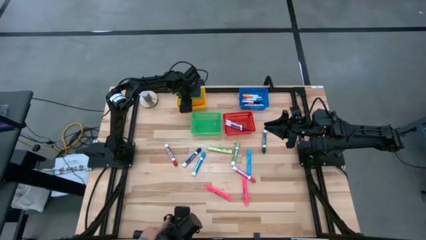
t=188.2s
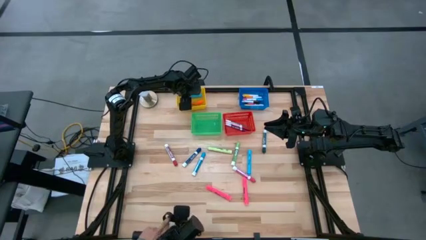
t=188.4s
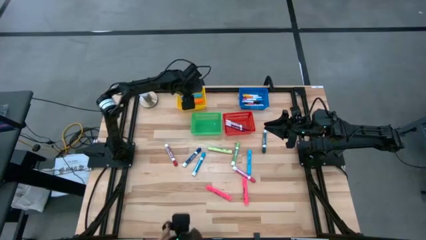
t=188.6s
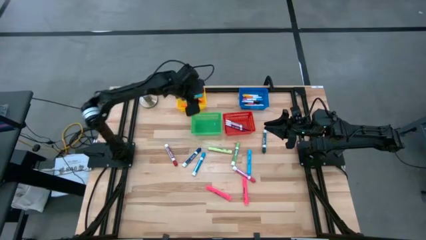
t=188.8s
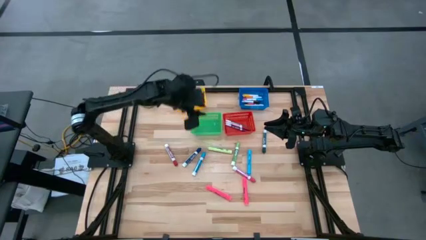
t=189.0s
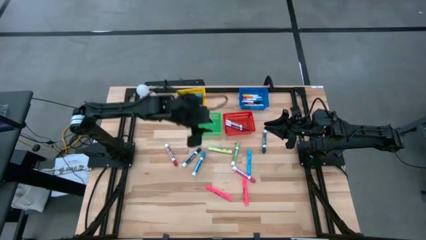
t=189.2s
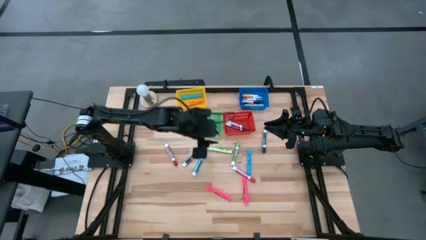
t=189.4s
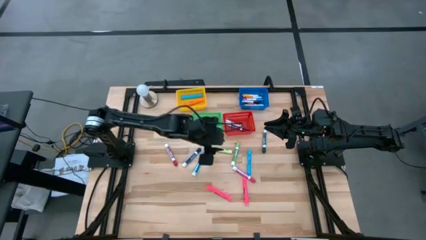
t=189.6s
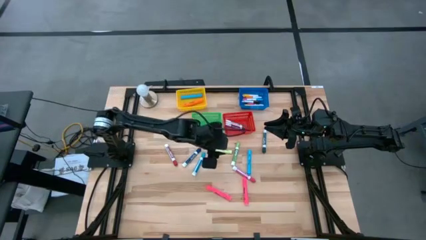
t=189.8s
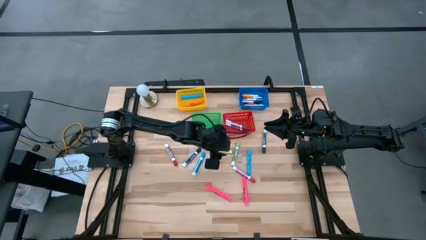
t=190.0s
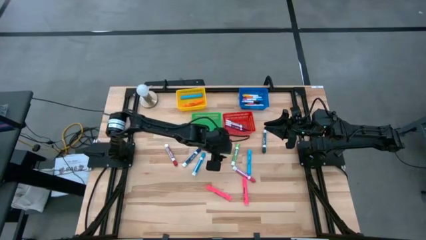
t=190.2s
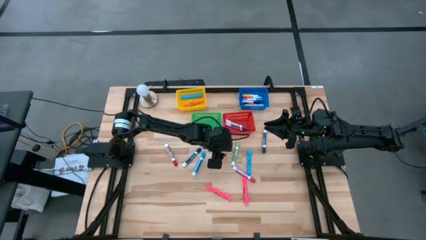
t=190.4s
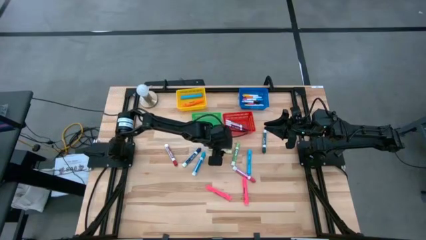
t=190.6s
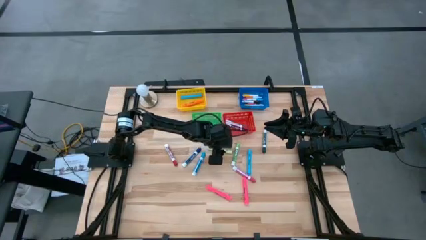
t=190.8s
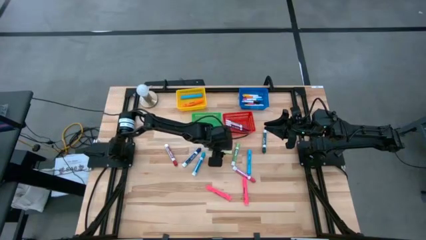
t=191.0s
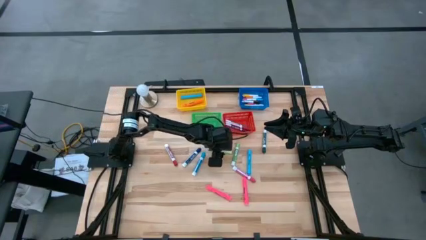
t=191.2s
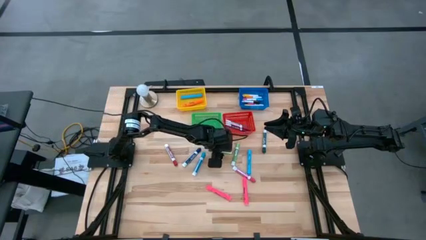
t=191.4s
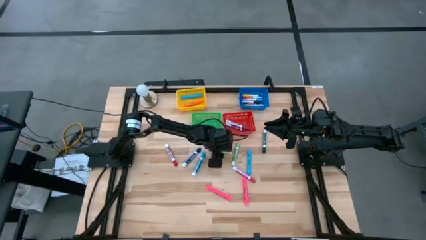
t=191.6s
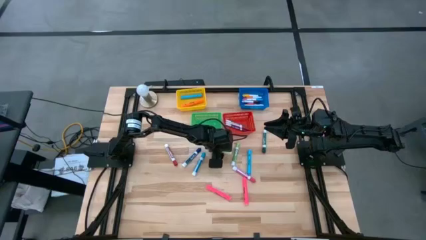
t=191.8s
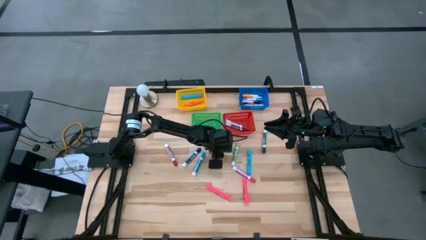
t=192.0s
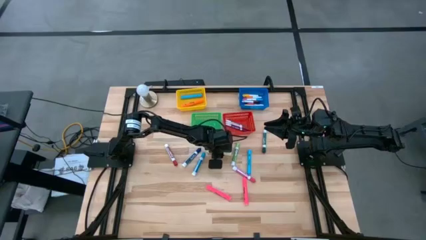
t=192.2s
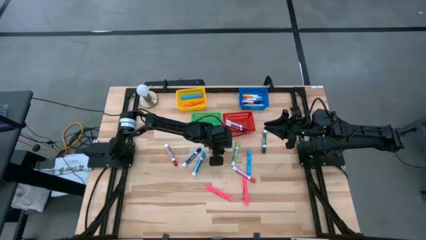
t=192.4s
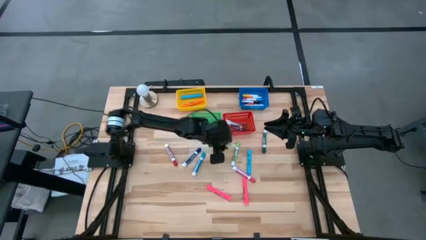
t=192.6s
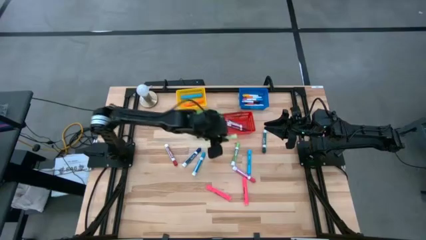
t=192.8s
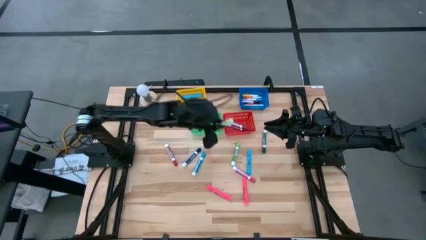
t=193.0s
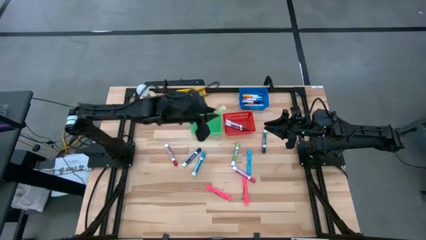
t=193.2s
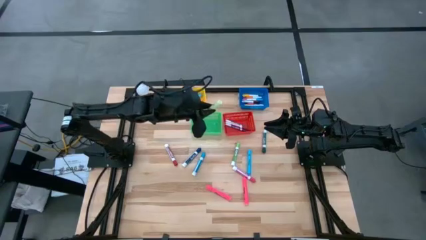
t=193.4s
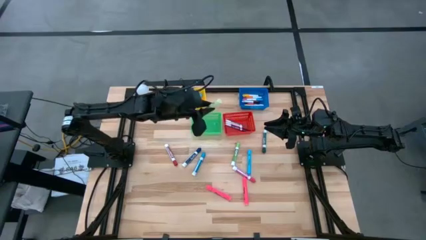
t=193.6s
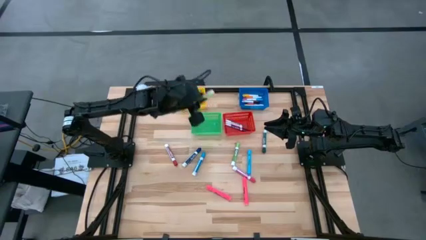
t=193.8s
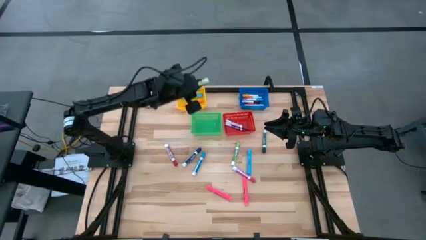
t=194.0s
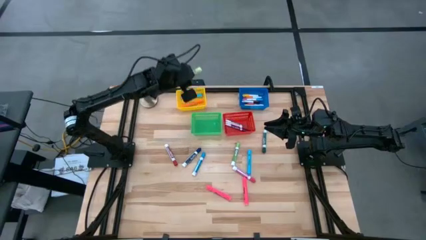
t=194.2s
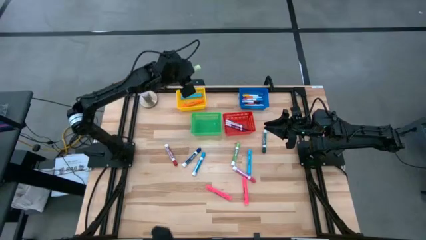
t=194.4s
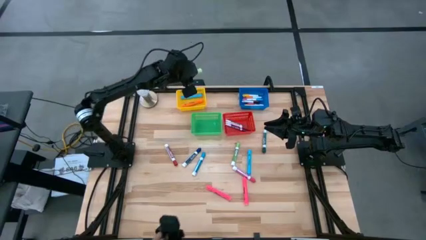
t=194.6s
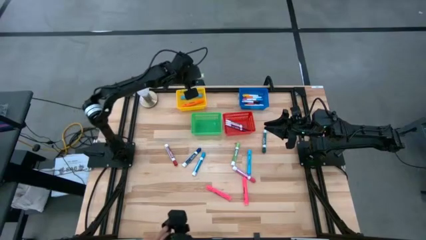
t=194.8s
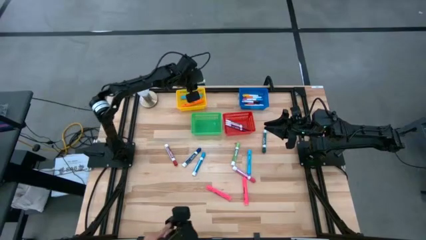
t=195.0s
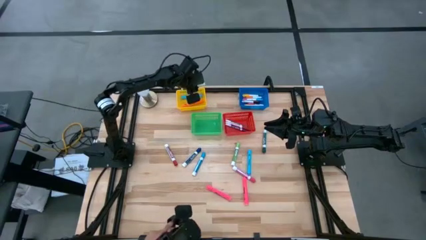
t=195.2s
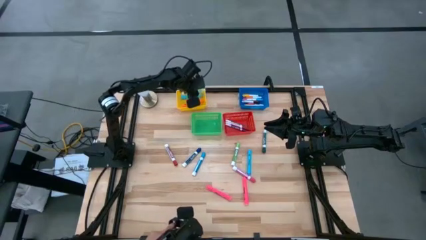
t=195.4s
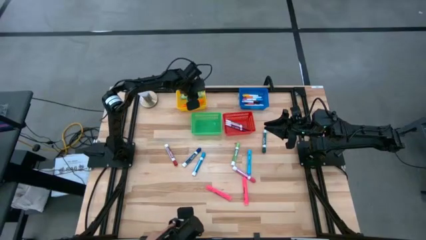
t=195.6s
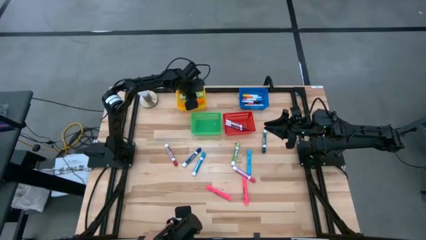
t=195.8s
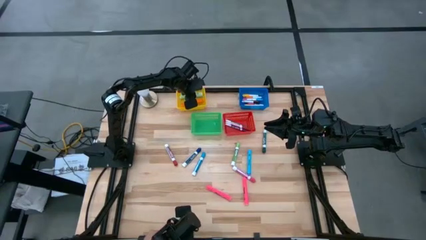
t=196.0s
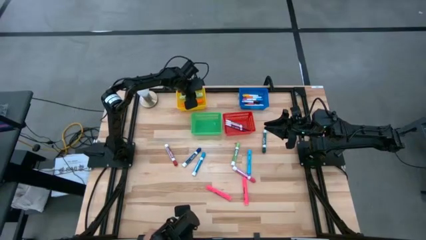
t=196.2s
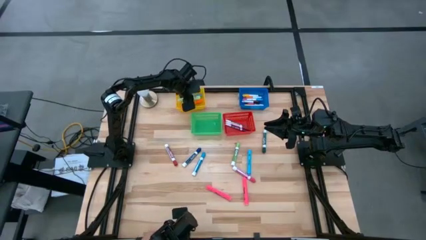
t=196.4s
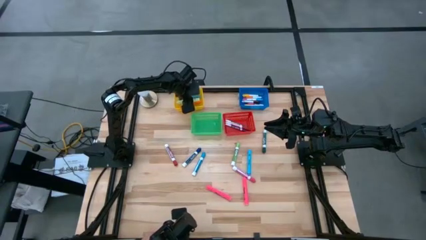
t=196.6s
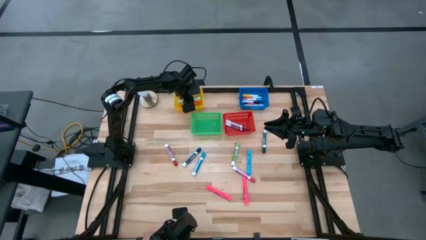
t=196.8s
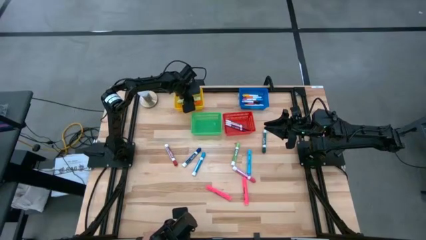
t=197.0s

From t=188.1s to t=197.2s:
Task: Pick & Place Markers
Put the green sharpie into the yellow bin

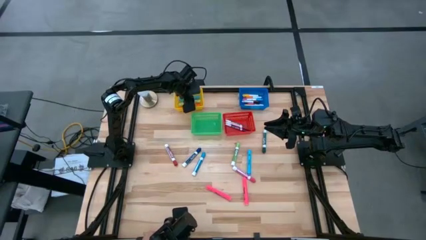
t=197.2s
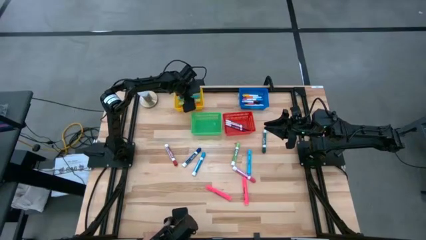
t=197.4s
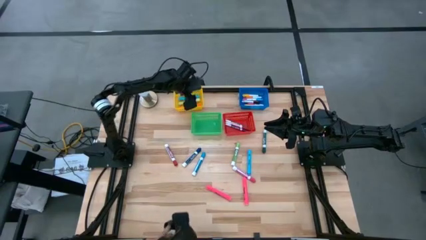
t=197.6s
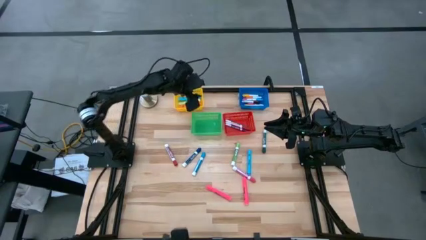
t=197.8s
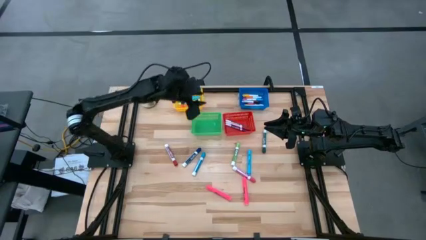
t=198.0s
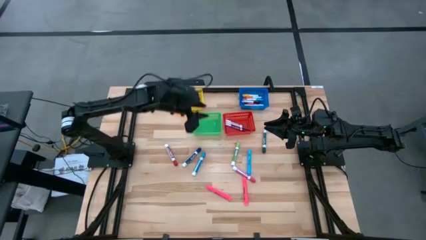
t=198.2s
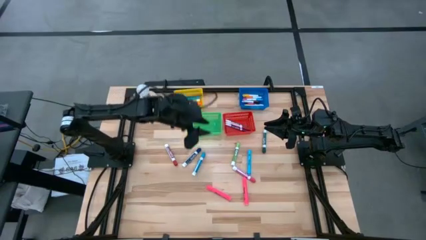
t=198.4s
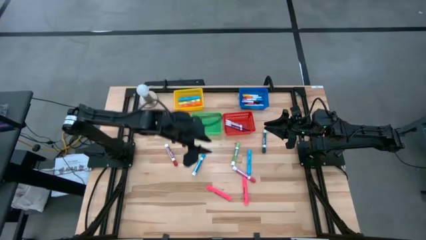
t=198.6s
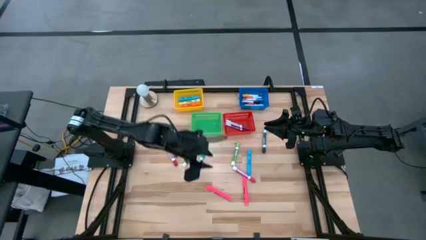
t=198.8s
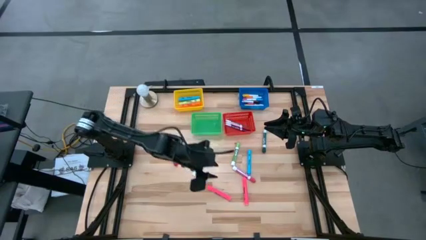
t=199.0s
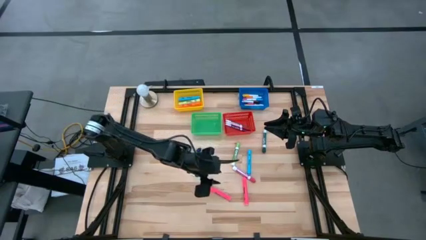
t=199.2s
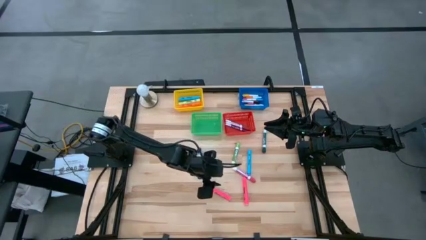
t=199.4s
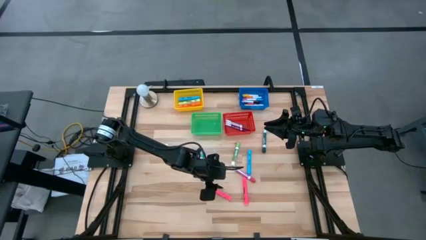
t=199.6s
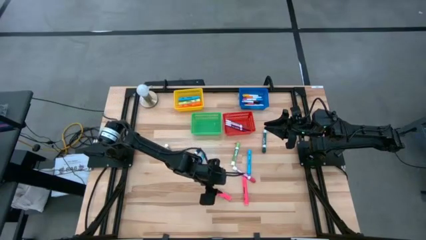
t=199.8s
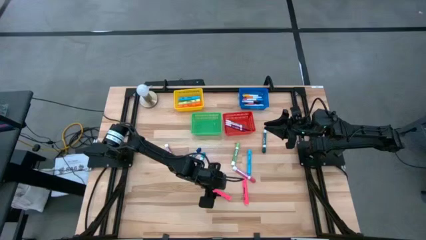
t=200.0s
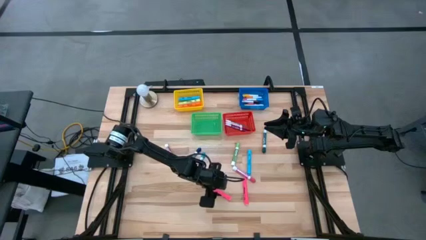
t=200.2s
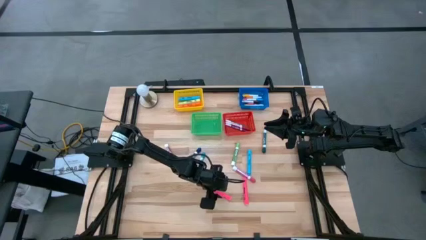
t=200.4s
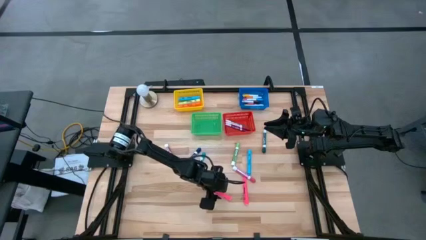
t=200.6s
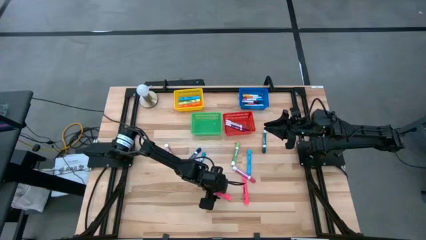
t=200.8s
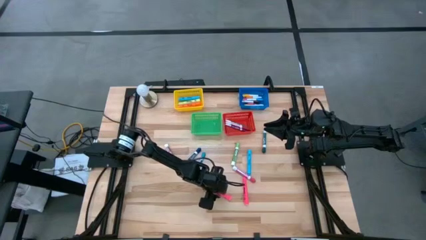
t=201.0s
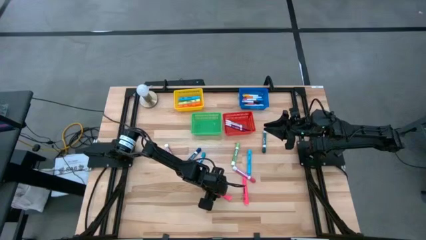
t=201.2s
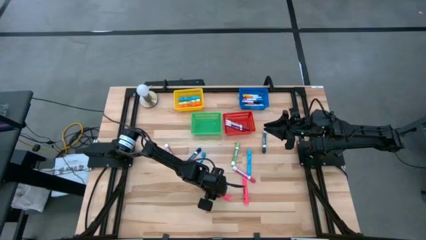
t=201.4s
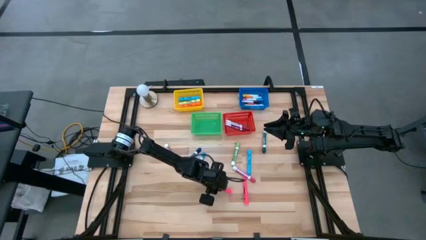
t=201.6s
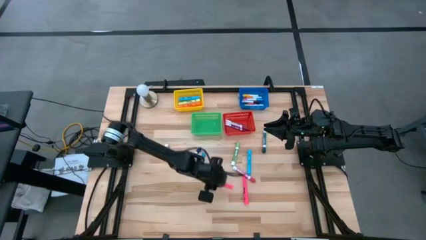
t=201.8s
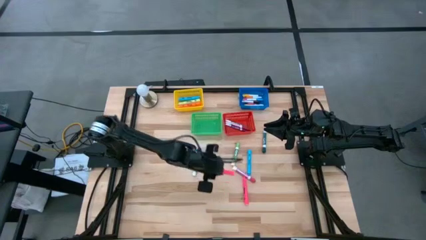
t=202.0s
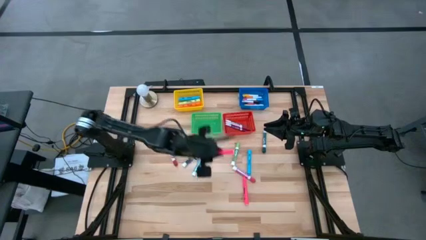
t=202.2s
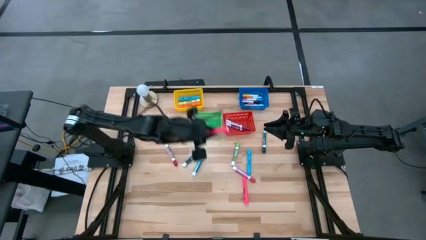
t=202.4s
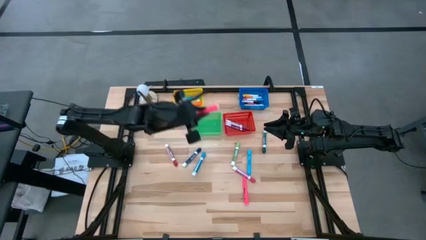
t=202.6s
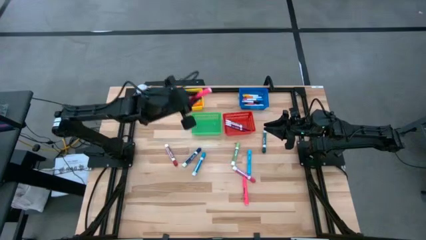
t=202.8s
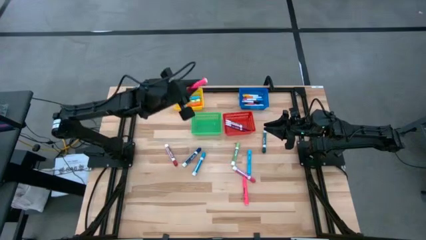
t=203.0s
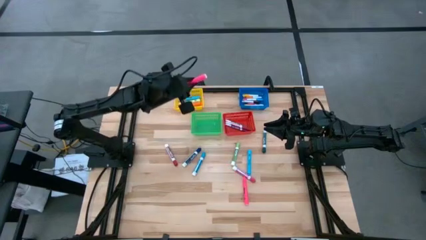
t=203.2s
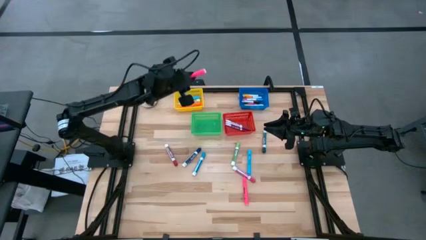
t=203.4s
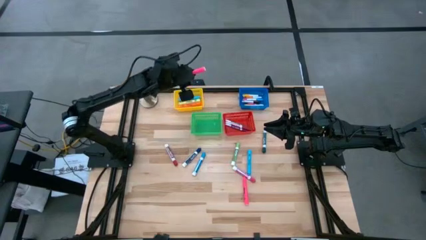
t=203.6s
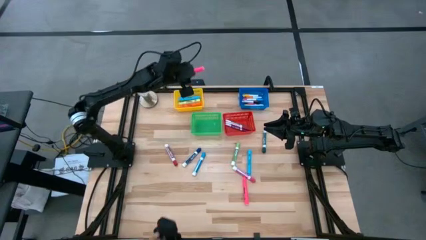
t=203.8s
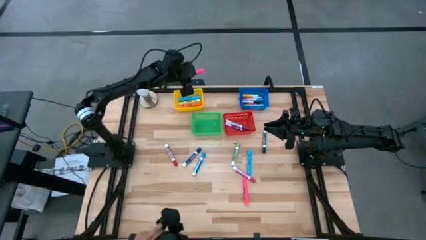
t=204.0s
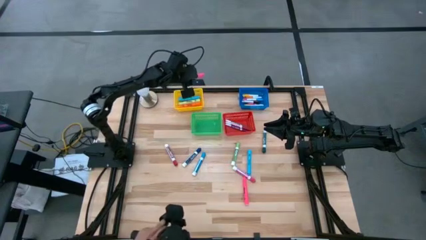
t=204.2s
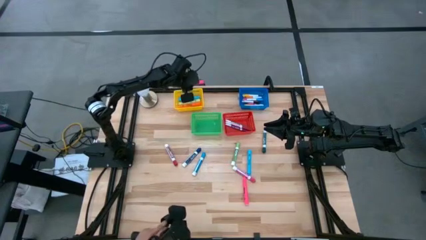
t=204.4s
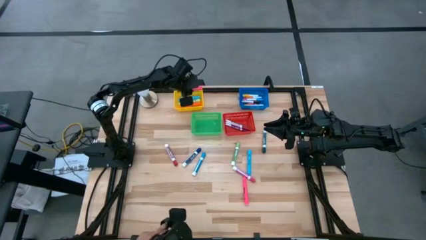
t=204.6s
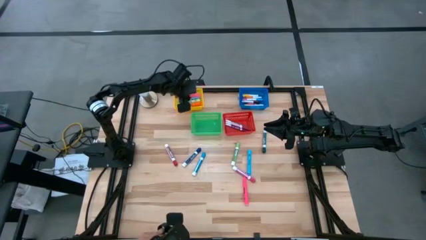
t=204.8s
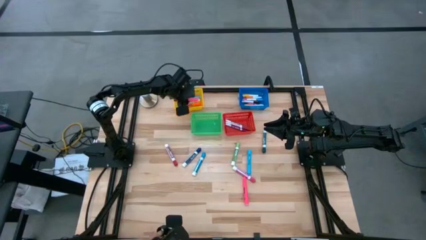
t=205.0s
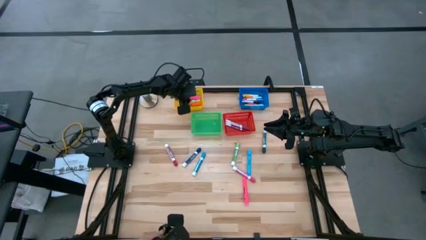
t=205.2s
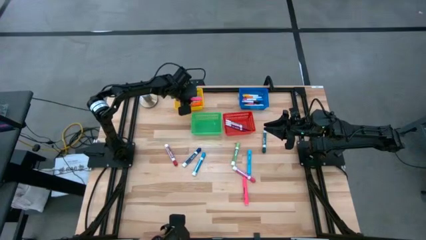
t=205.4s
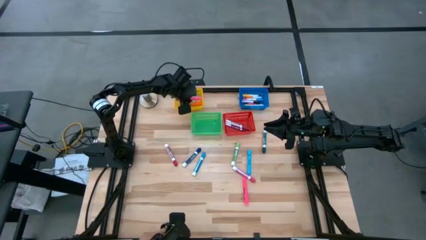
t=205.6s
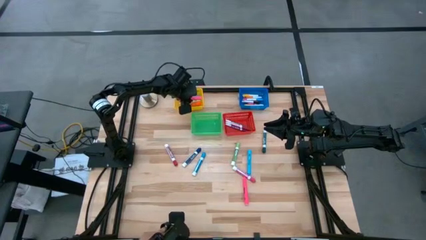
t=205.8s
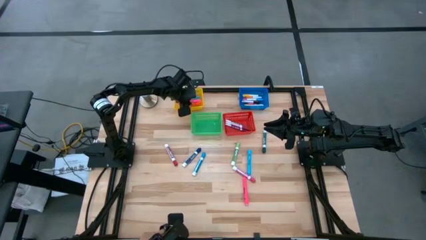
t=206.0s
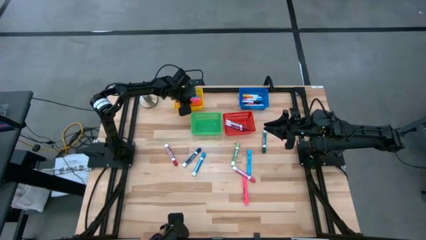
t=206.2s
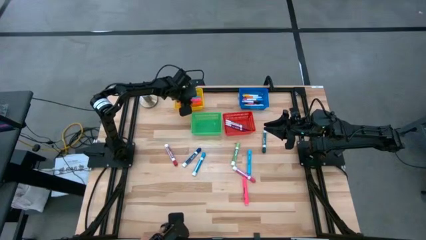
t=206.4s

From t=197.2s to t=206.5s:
Put the pink sharpie into the yellow bin
